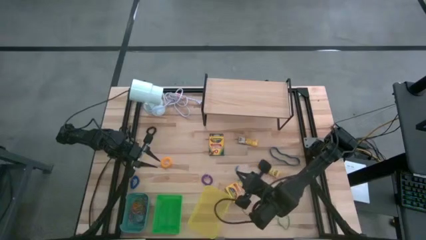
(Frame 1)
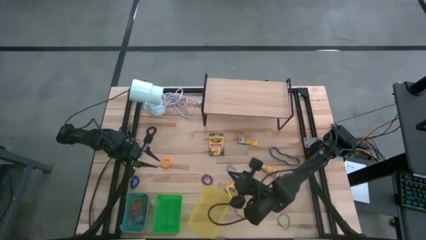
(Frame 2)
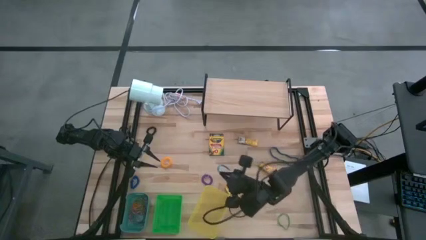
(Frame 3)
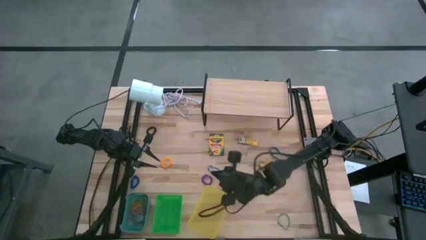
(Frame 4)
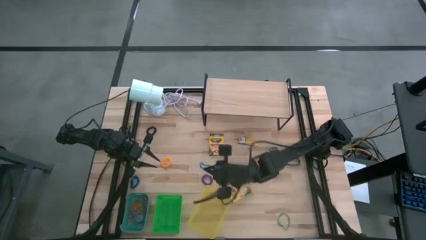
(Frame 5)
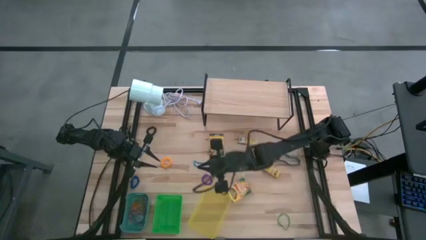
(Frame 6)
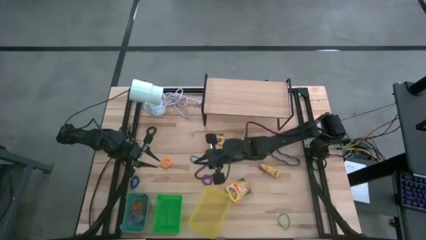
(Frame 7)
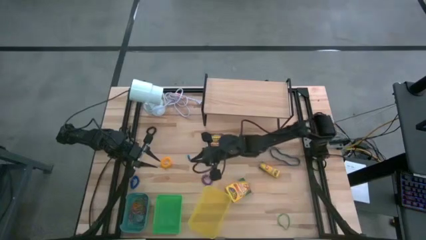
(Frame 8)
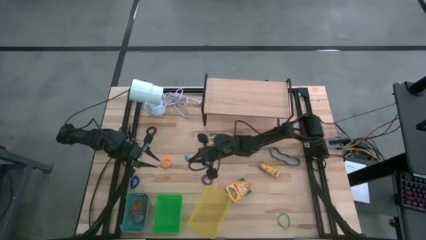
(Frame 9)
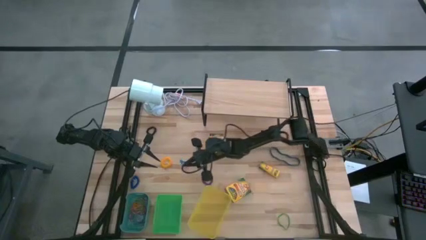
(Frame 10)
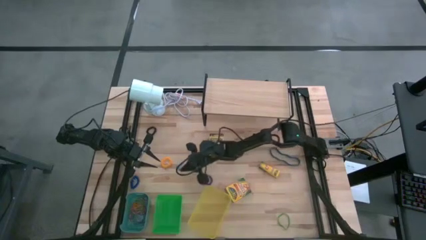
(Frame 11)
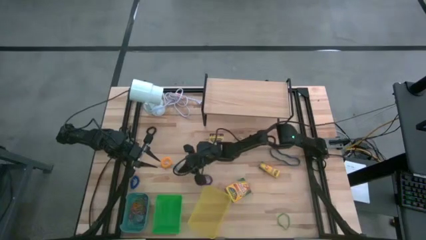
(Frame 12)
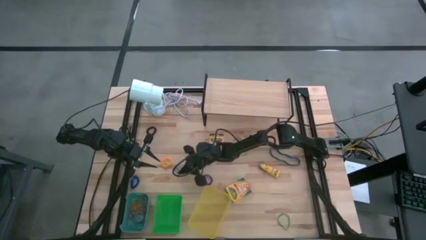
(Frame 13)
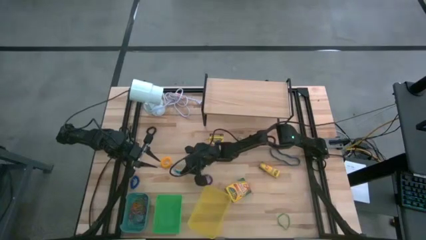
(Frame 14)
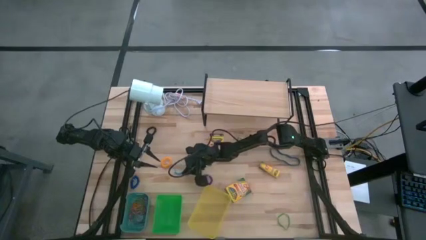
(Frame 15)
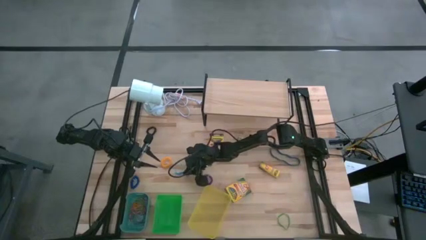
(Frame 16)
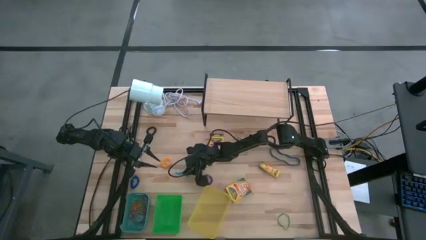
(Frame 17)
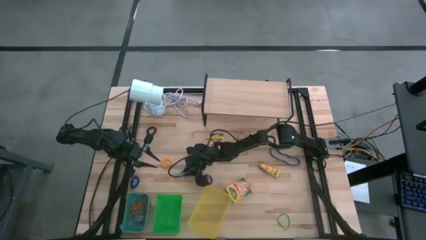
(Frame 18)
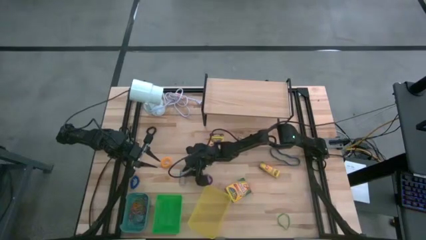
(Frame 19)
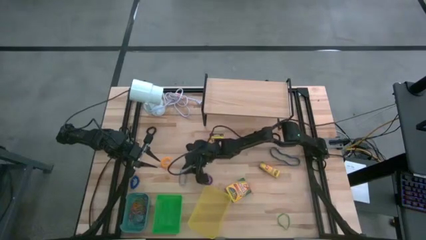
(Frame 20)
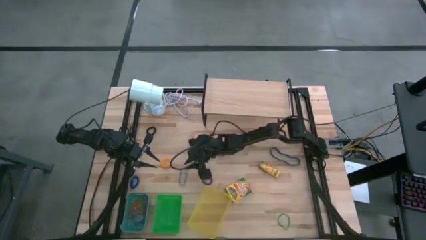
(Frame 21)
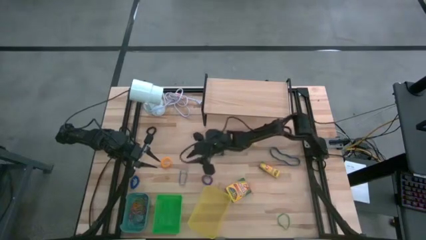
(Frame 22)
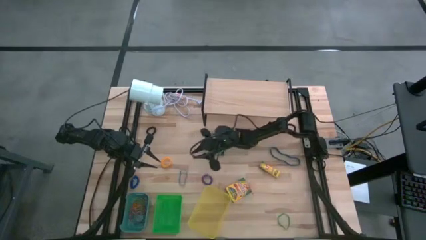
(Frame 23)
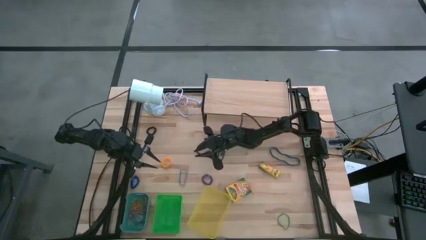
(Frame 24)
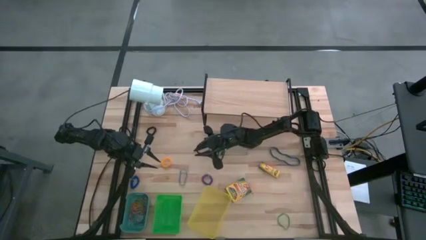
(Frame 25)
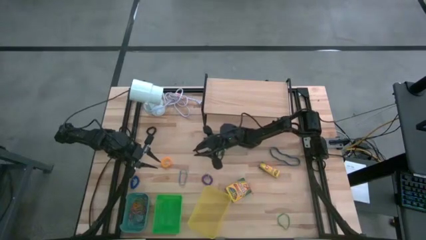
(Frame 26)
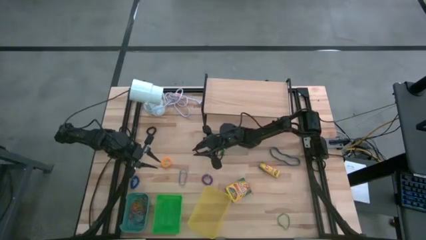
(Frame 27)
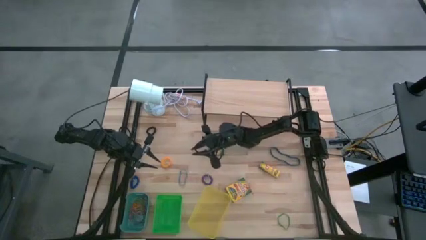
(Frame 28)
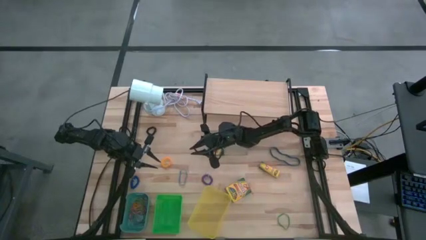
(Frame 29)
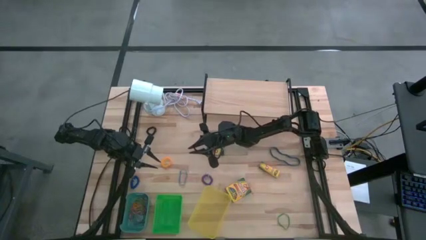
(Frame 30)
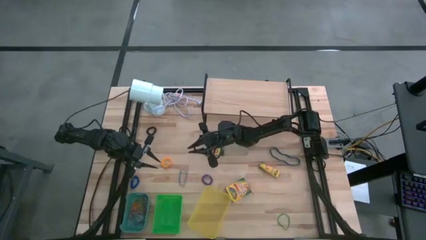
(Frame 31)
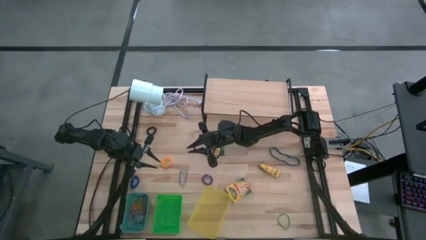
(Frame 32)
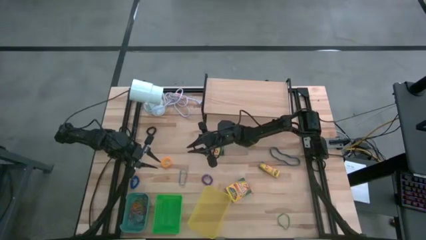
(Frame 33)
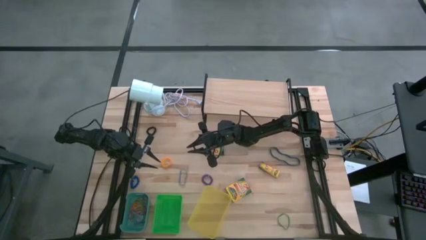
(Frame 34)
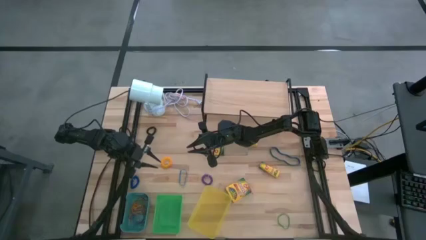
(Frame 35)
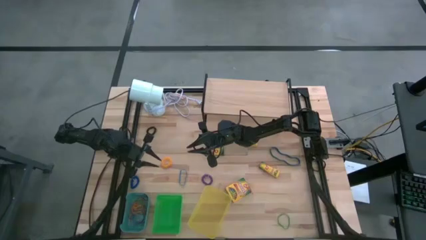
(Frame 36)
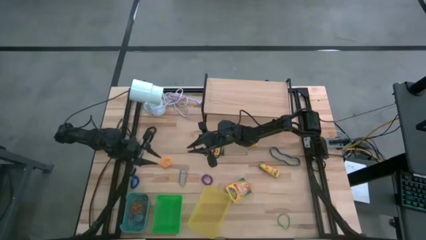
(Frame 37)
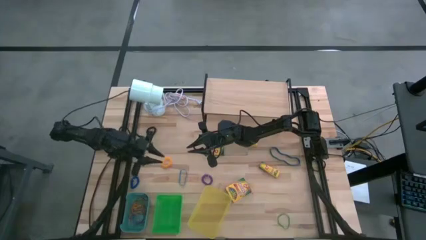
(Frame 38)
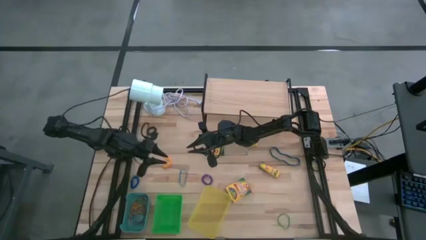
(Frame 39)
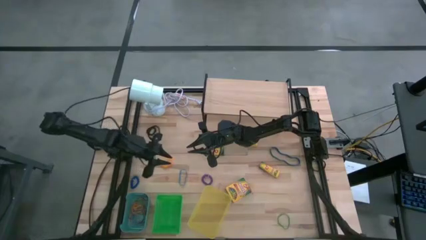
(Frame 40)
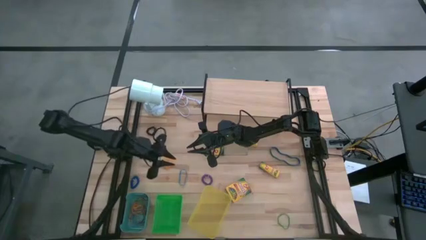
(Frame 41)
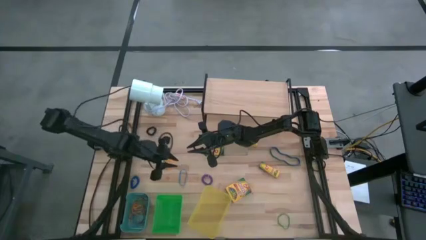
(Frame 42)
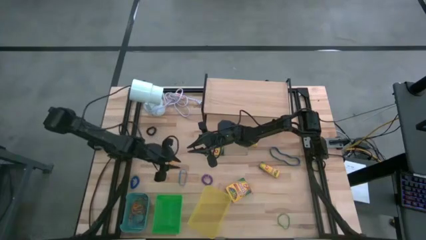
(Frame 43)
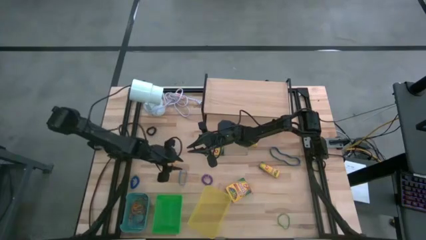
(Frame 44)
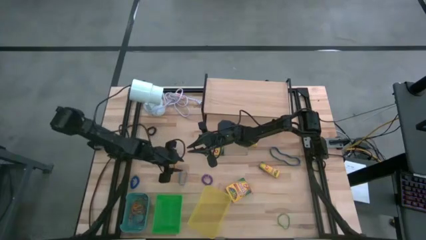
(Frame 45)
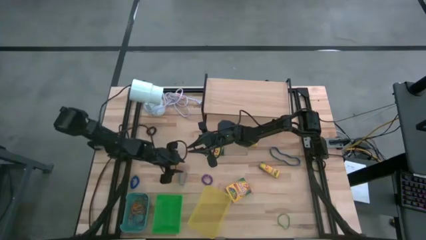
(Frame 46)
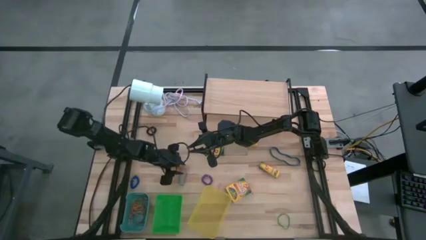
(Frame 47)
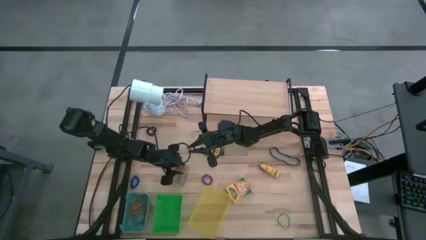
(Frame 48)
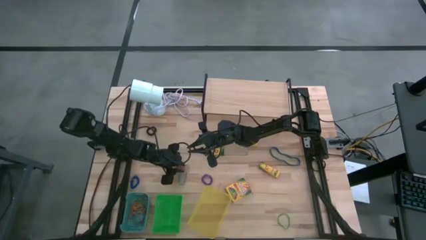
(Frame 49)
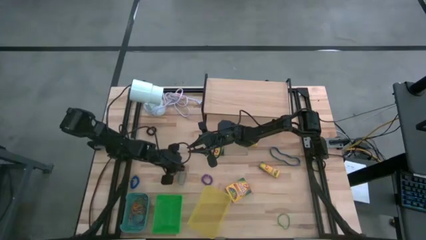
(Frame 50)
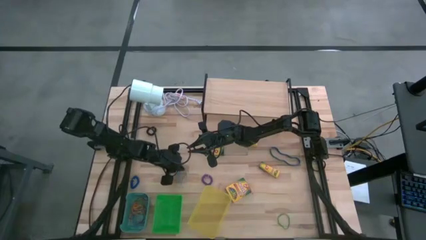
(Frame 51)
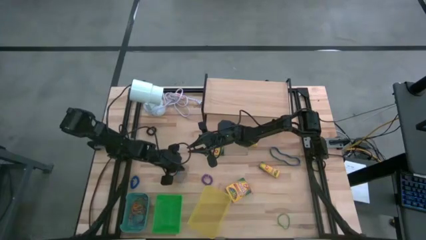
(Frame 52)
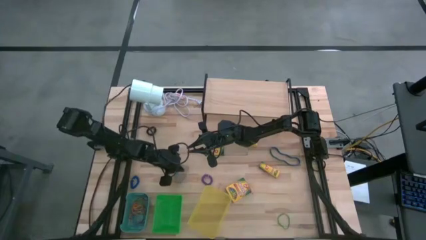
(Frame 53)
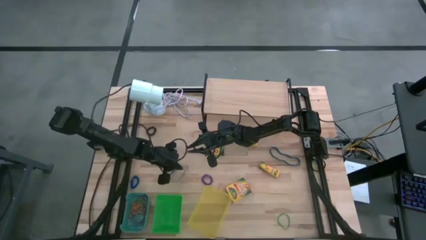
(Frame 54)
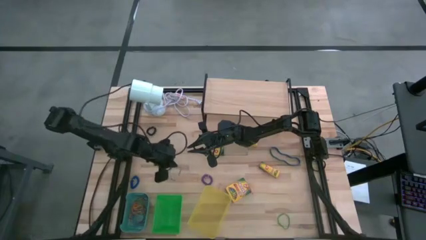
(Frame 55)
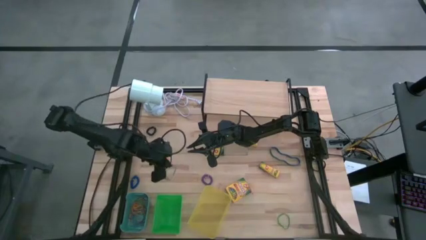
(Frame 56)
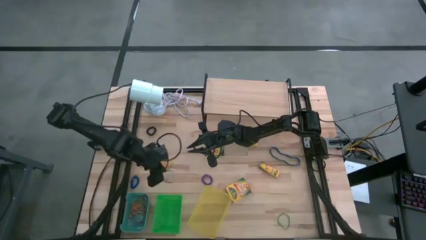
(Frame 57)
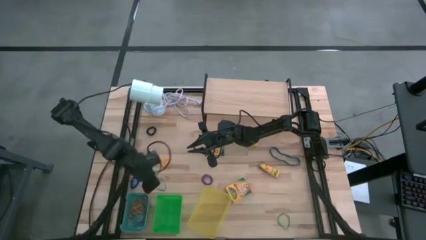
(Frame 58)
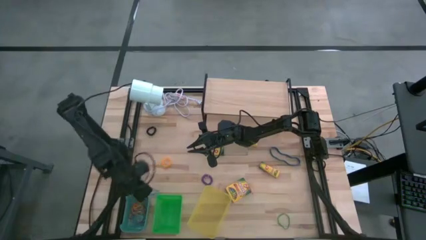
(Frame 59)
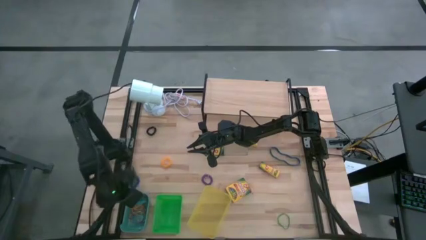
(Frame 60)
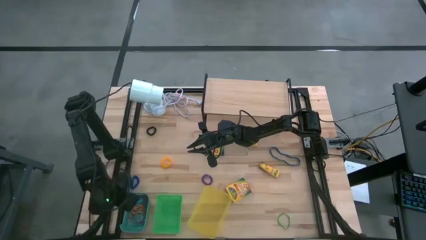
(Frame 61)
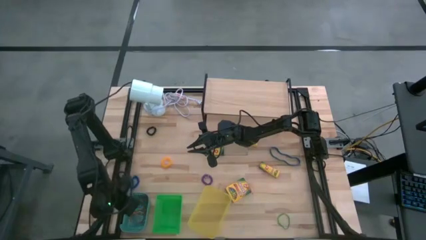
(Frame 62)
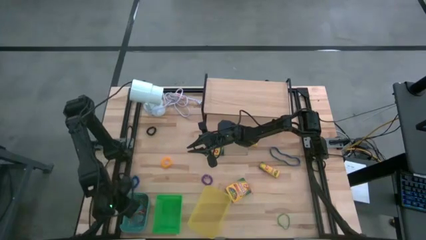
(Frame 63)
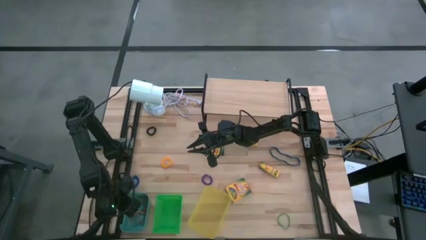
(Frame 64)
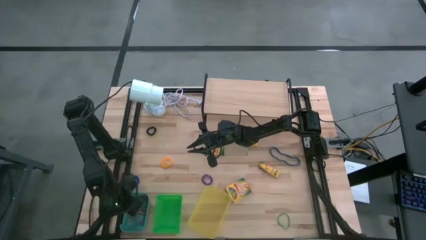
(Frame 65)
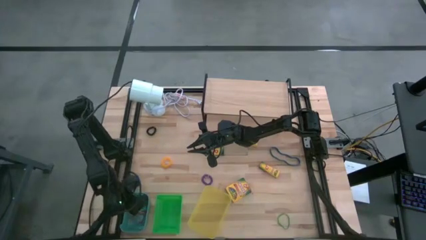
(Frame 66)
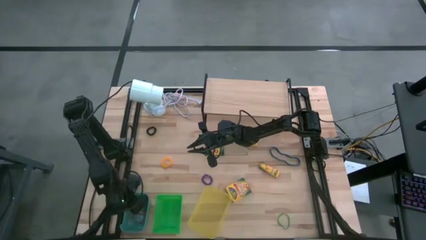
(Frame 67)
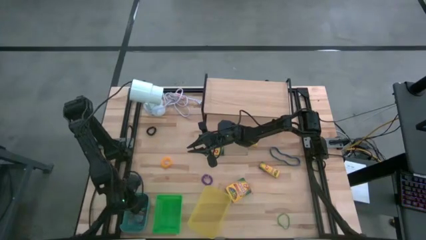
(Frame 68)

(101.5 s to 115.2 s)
Task: Pick & Place Office Desk Supplies
Put the blue rubberband into the blue bin
